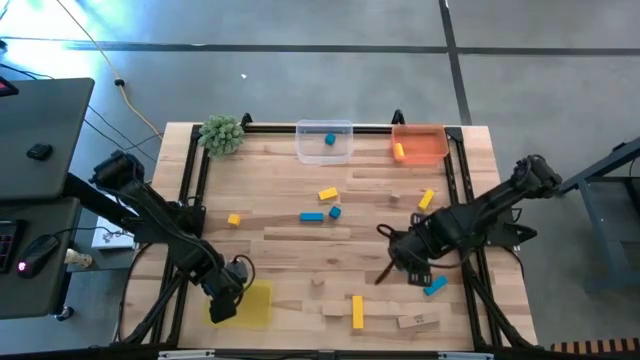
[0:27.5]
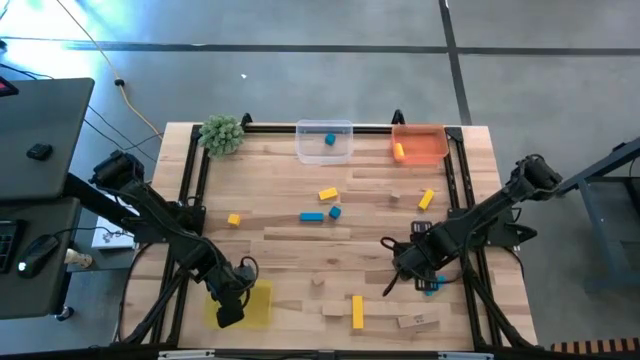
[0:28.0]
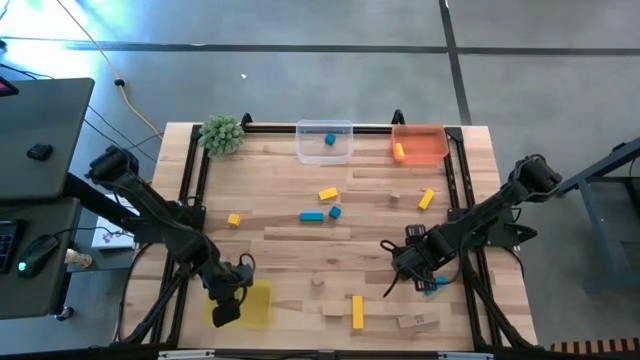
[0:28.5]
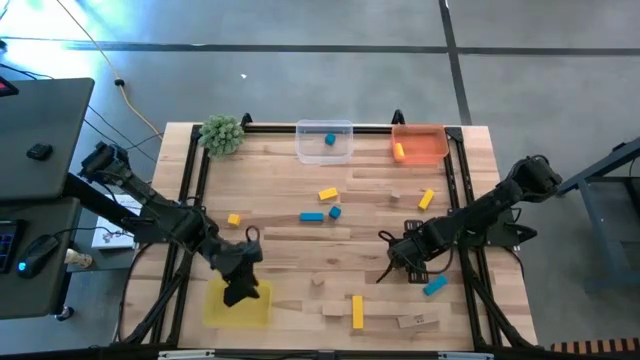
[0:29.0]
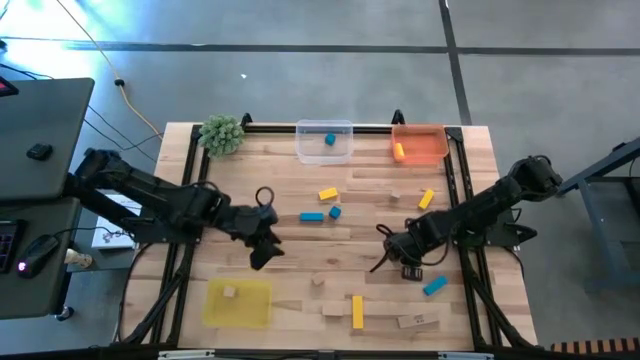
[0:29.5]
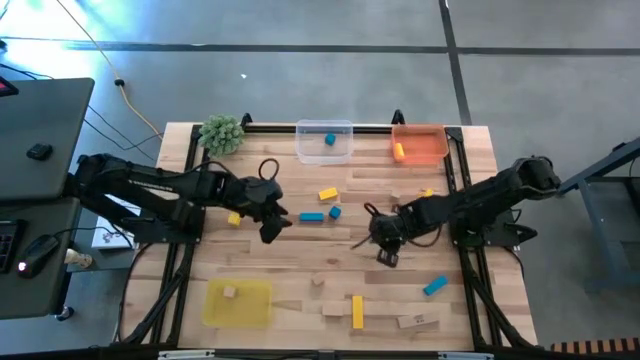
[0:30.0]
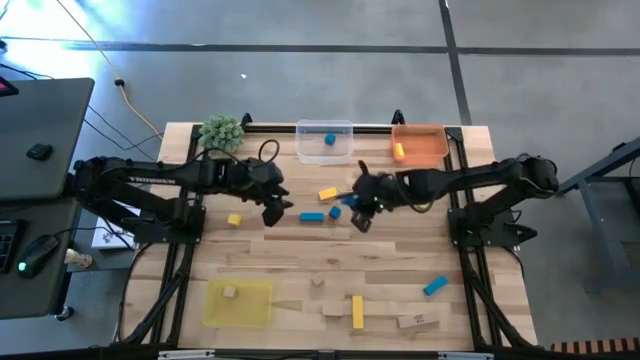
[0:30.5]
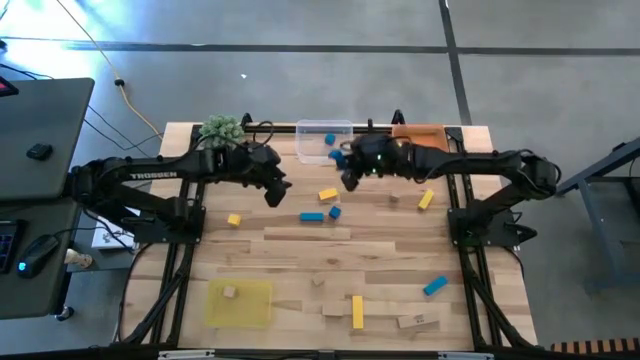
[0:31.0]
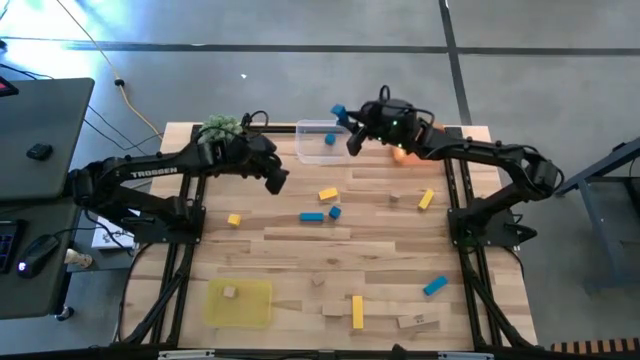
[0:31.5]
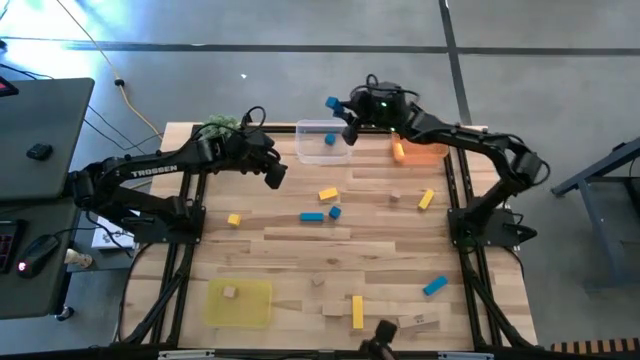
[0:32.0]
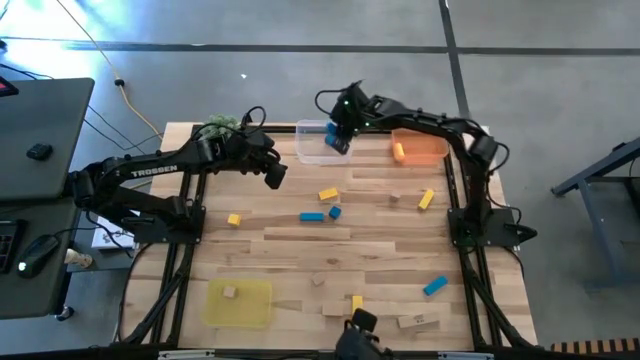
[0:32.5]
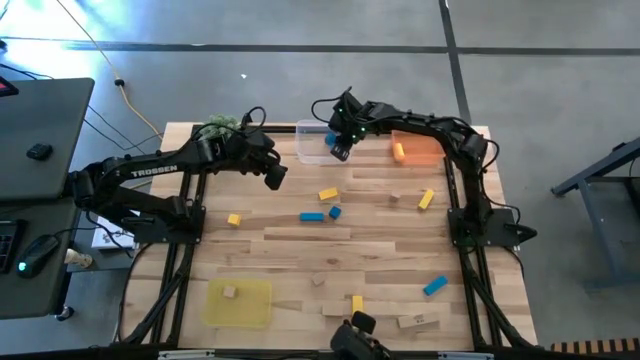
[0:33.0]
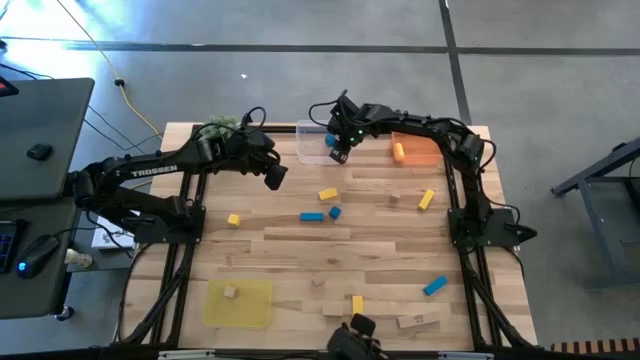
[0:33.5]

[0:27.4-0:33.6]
Task: Sort & place blocks by color
Put the blue block into the transparent bin

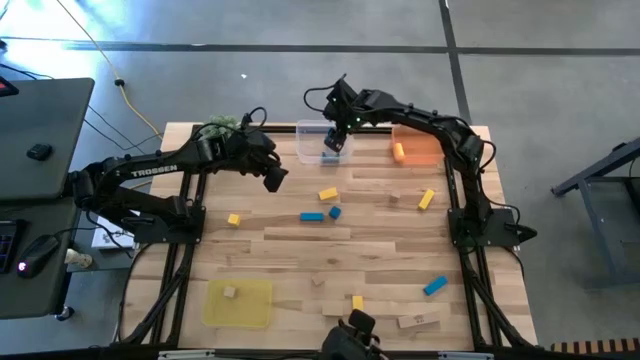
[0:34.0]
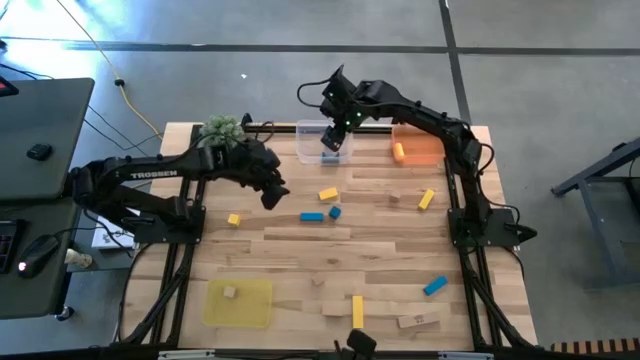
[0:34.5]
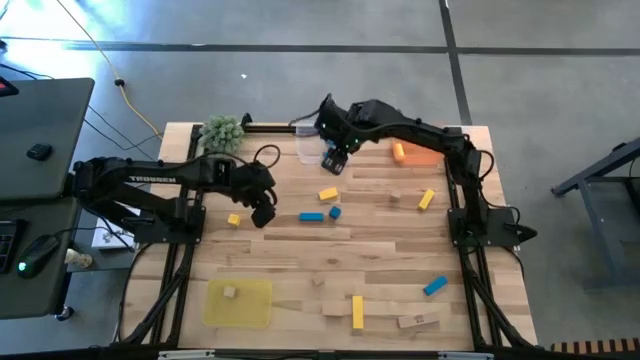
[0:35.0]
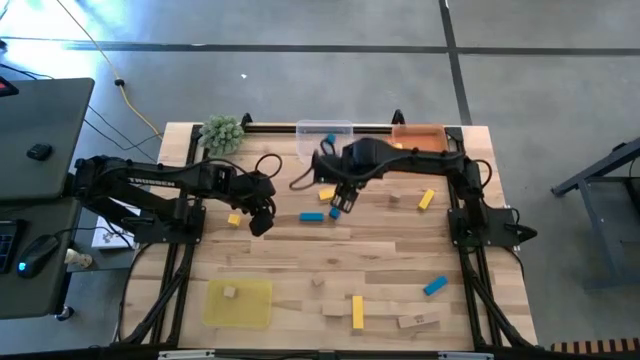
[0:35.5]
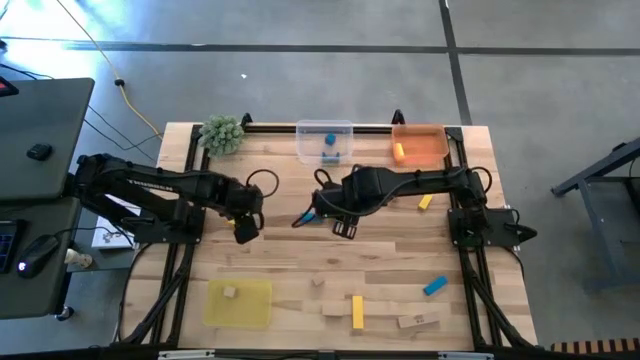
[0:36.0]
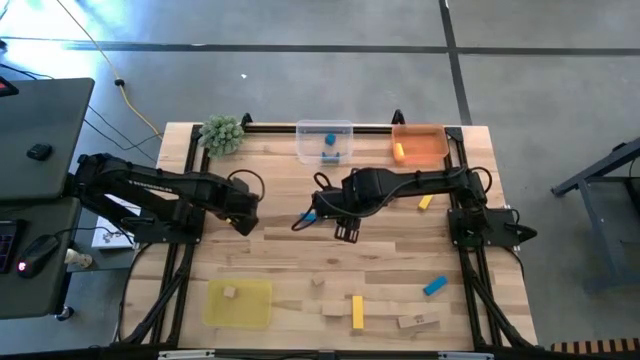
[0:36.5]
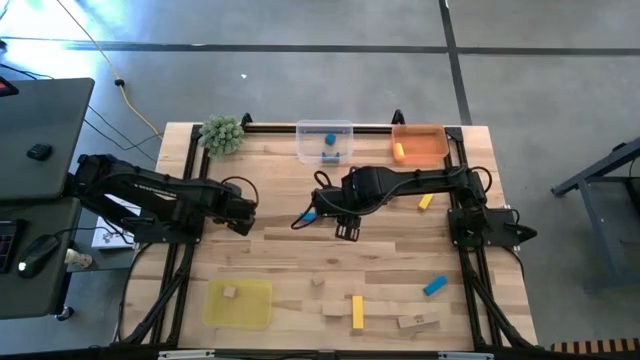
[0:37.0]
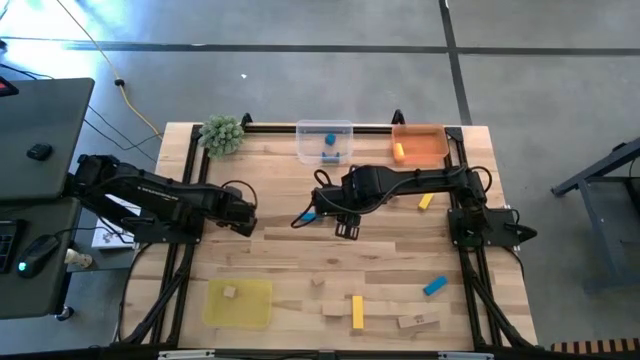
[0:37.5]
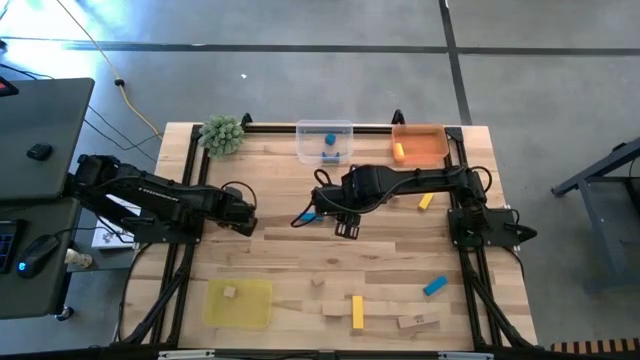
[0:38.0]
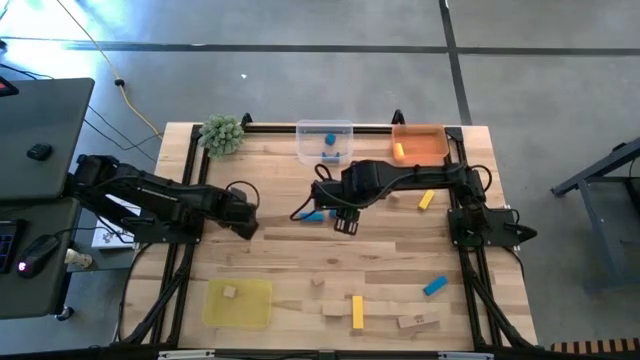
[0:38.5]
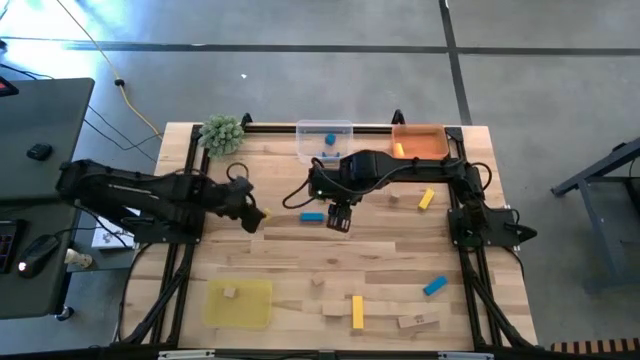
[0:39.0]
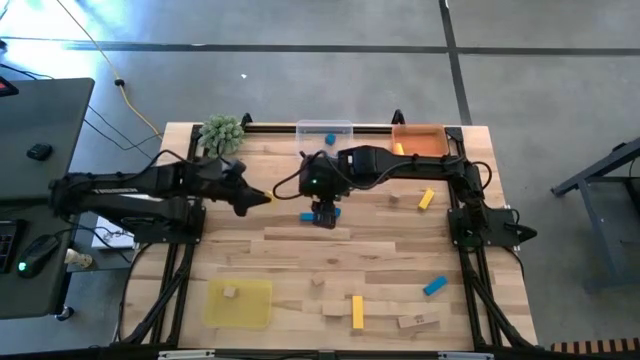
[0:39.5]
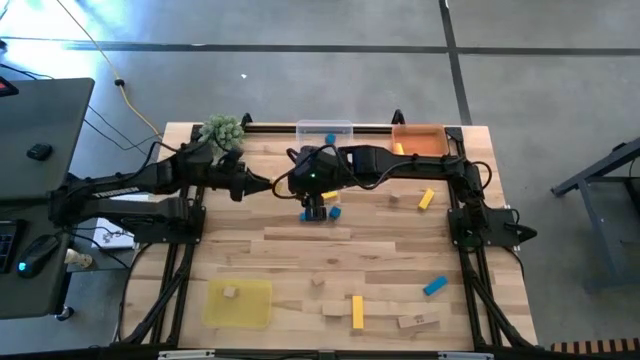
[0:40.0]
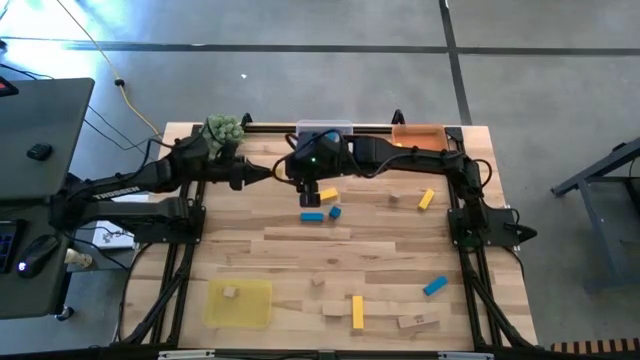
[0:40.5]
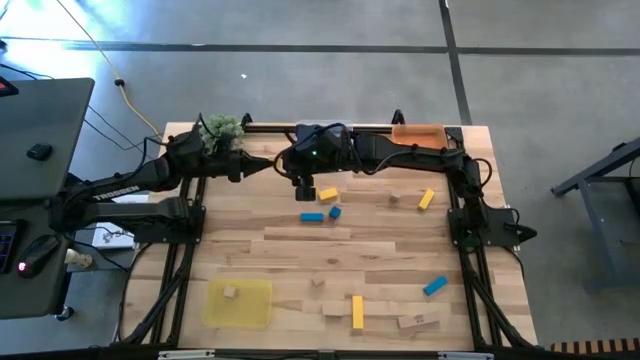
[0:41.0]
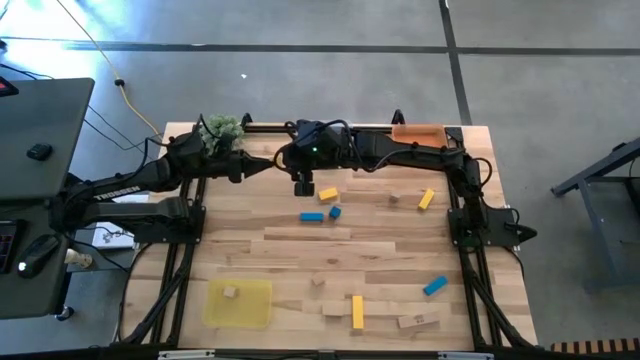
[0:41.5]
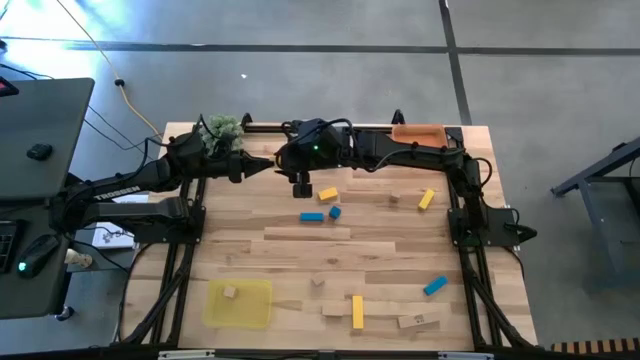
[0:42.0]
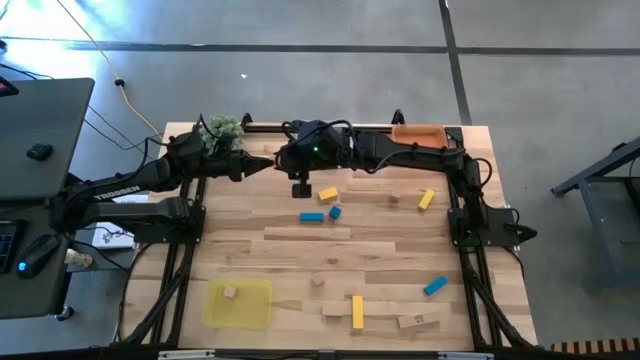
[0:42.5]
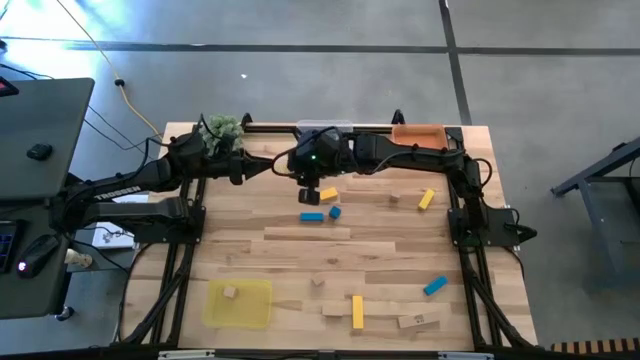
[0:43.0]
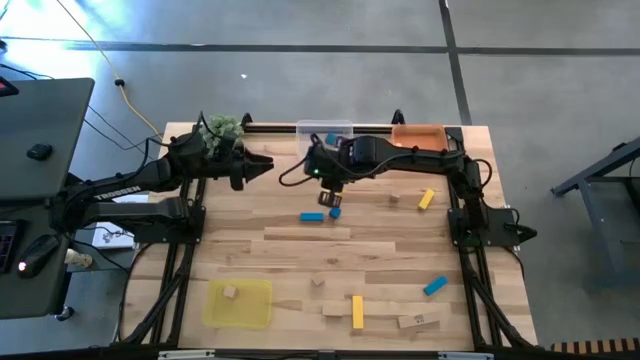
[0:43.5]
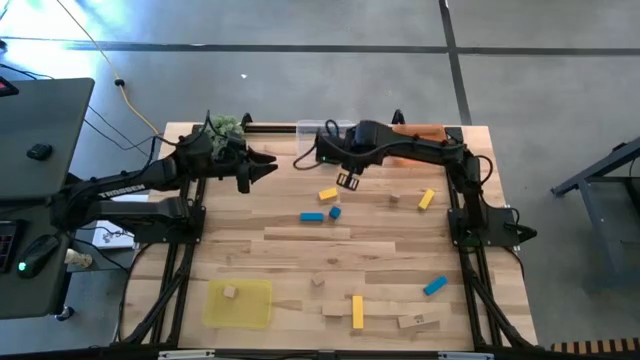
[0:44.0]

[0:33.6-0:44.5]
Put the yellow block into the orange bin

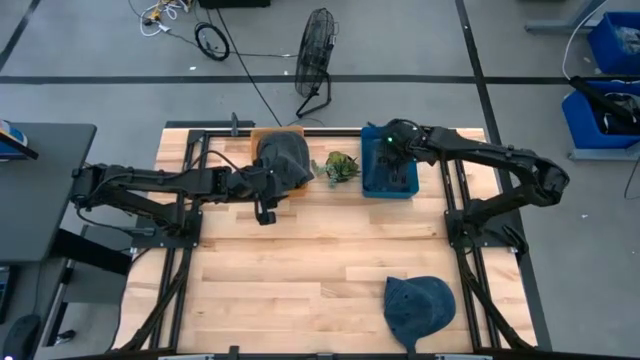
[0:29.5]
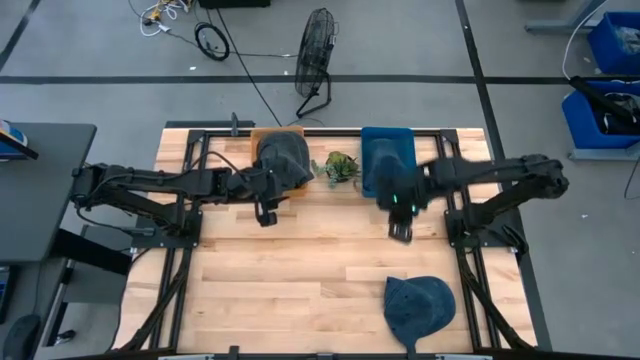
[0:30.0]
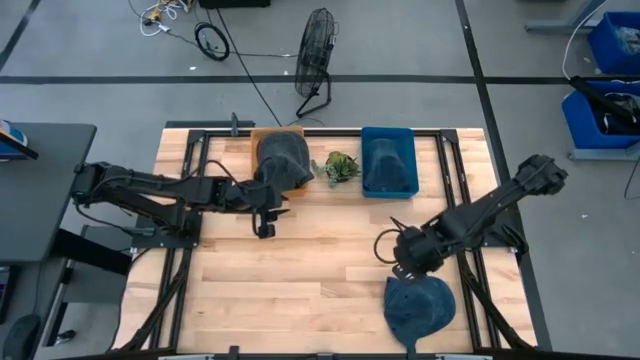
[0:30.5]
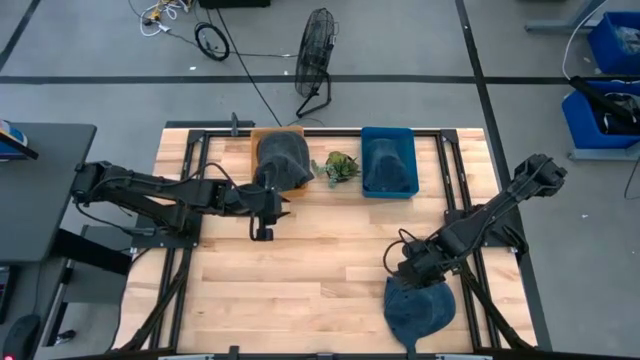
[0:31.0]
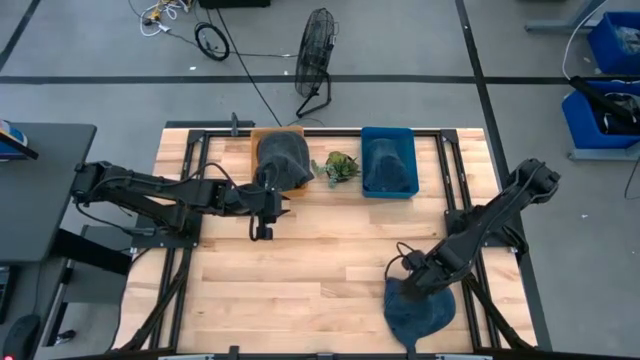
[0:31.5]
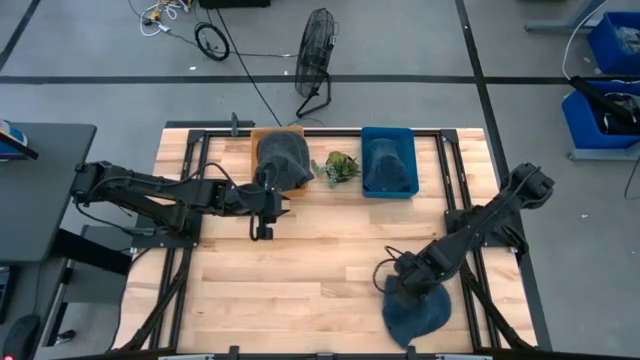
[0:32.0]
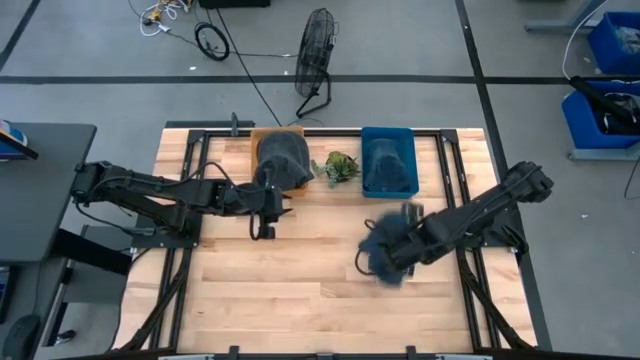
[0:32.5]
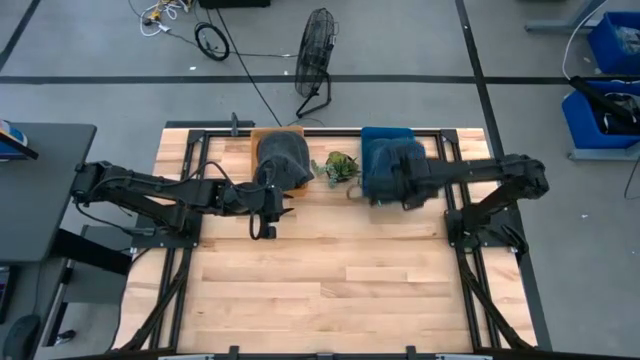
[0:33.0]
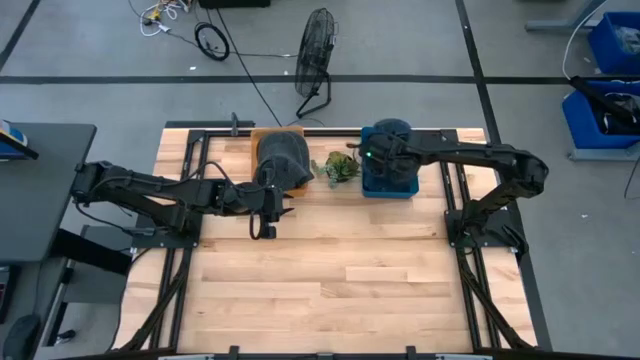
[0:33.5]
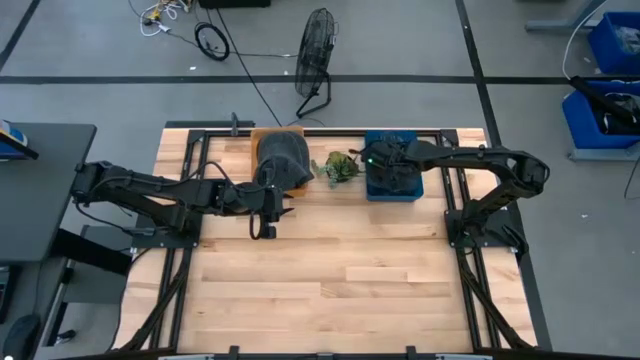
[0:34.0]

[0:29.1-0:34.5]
Task: Pick & Place hat
Put the blue cap into the blue bin
